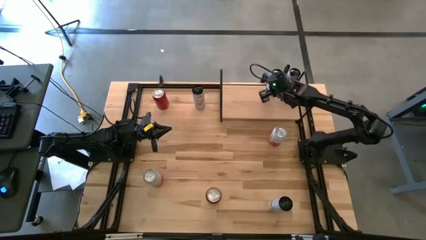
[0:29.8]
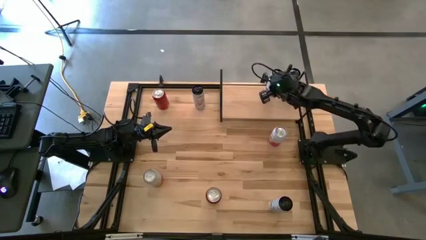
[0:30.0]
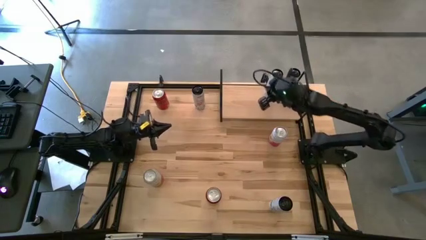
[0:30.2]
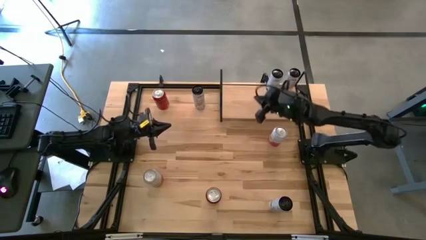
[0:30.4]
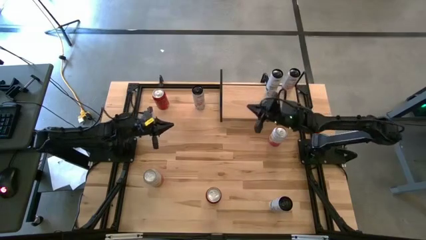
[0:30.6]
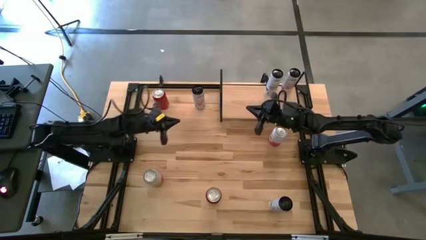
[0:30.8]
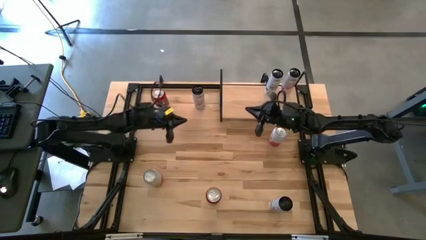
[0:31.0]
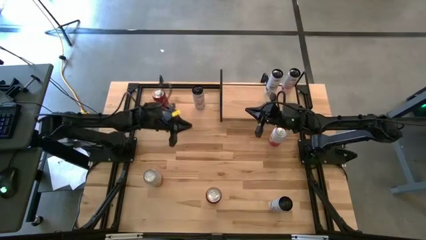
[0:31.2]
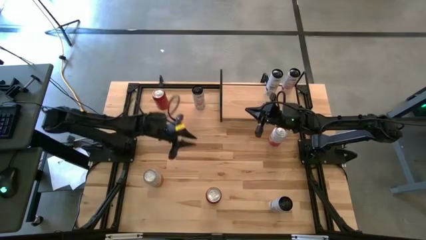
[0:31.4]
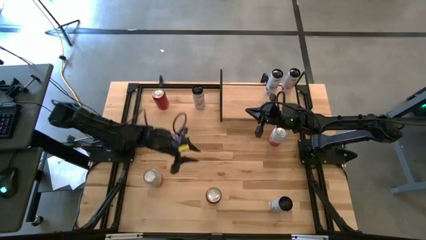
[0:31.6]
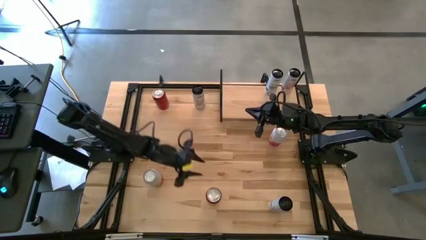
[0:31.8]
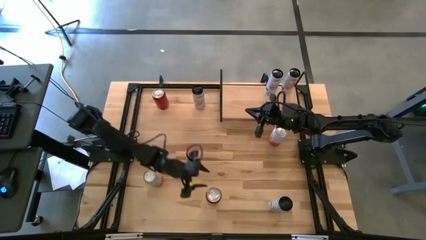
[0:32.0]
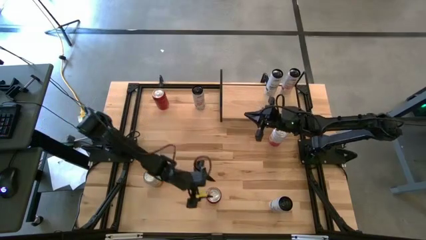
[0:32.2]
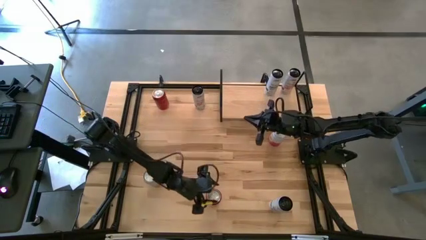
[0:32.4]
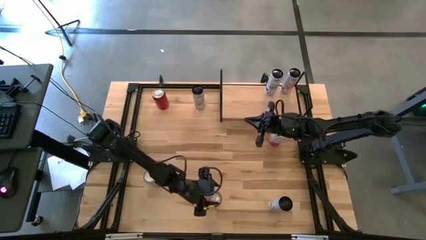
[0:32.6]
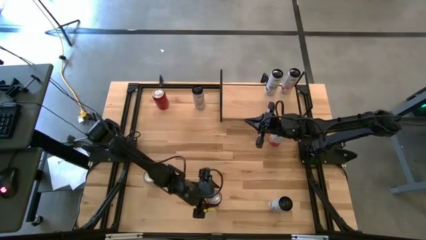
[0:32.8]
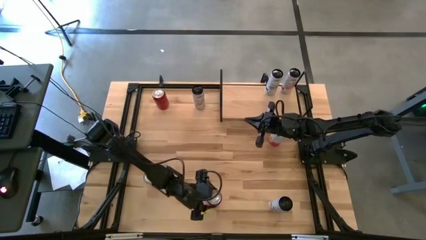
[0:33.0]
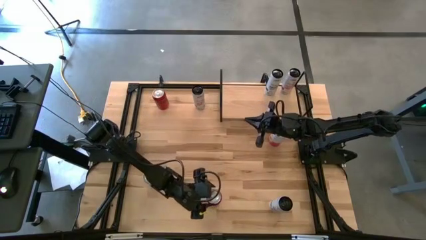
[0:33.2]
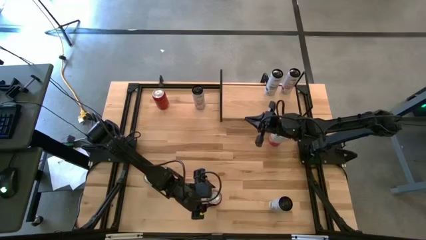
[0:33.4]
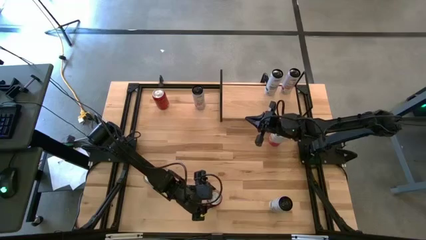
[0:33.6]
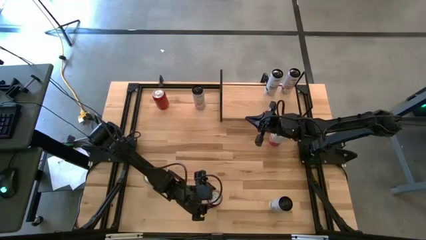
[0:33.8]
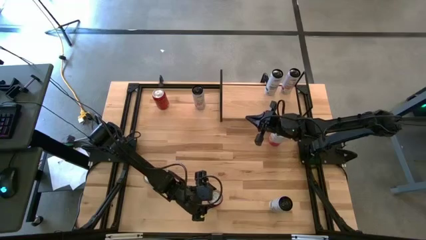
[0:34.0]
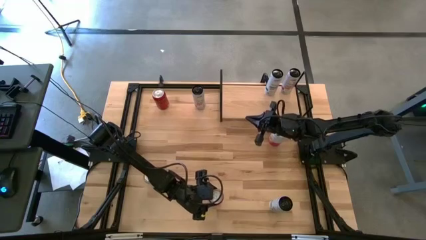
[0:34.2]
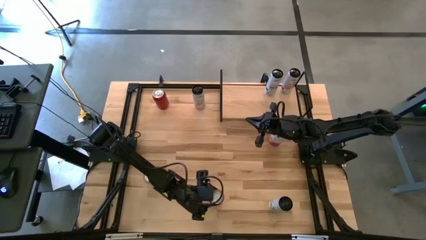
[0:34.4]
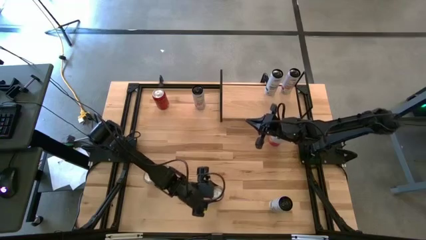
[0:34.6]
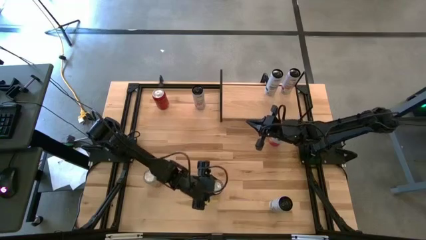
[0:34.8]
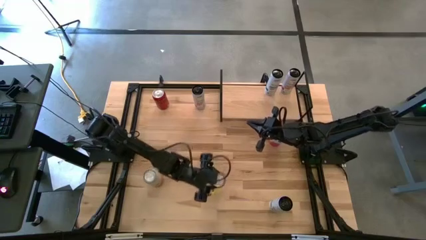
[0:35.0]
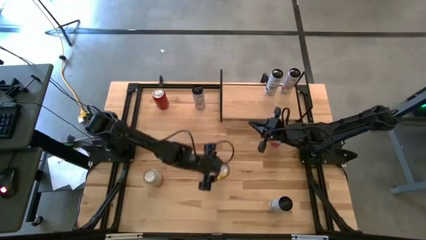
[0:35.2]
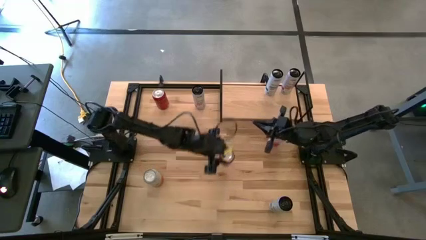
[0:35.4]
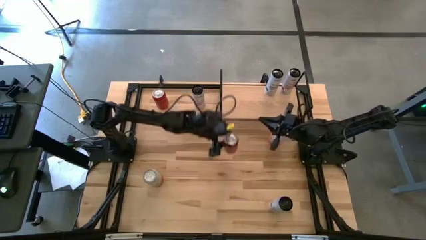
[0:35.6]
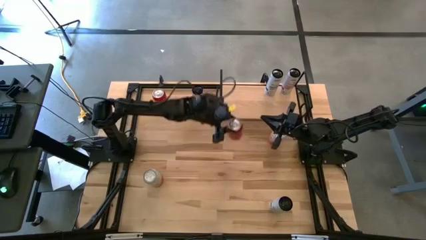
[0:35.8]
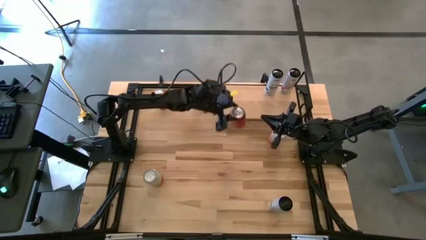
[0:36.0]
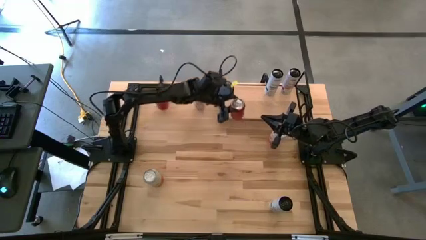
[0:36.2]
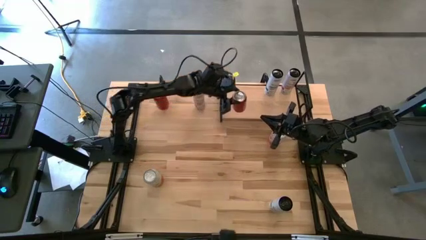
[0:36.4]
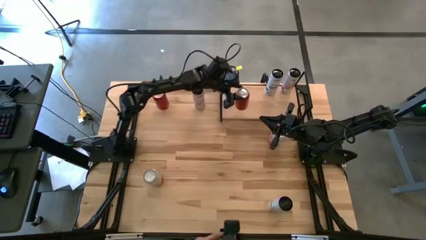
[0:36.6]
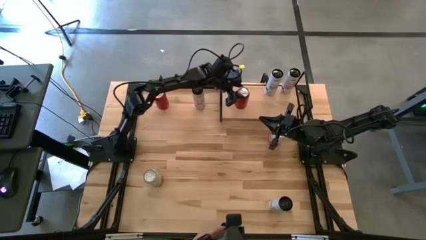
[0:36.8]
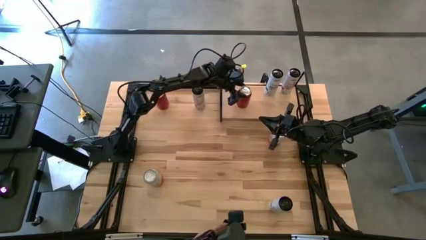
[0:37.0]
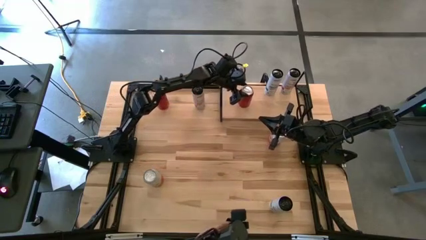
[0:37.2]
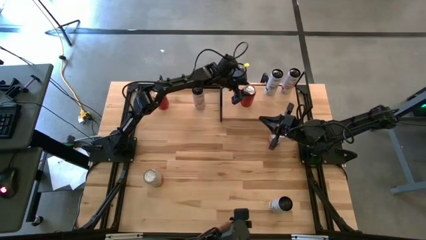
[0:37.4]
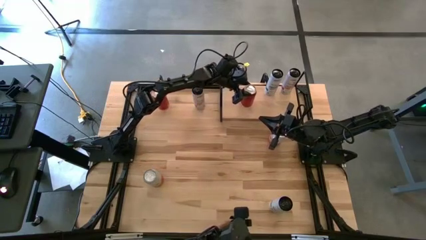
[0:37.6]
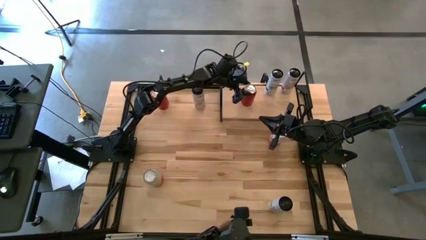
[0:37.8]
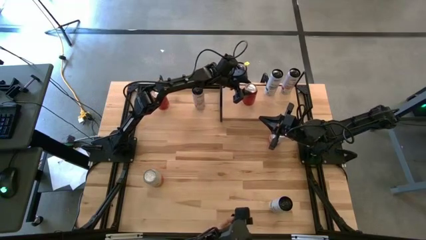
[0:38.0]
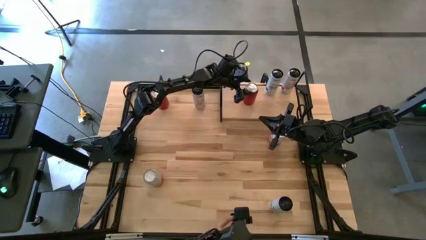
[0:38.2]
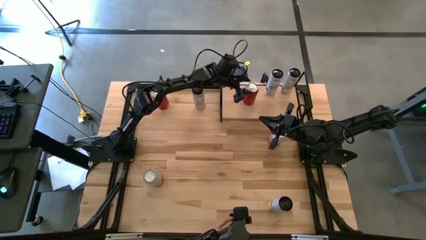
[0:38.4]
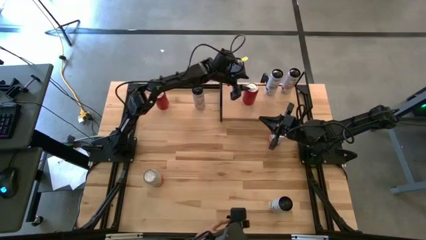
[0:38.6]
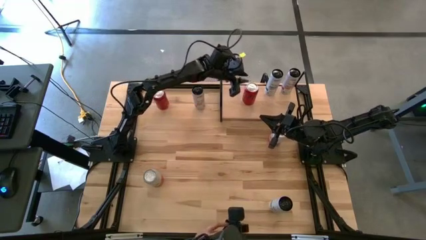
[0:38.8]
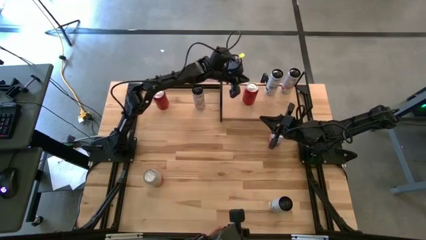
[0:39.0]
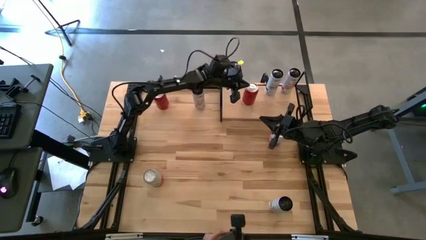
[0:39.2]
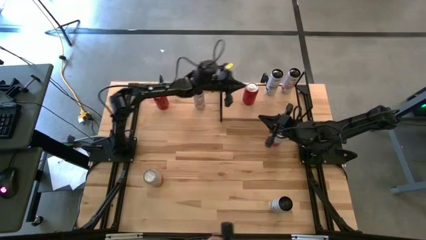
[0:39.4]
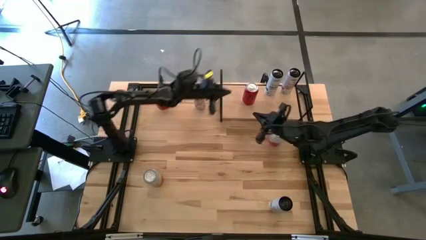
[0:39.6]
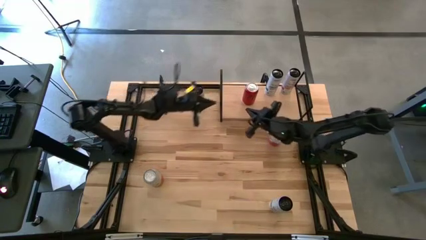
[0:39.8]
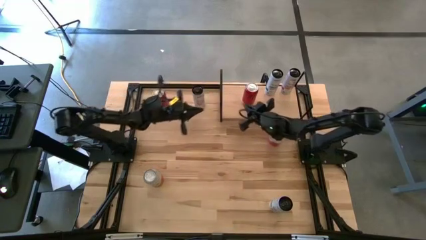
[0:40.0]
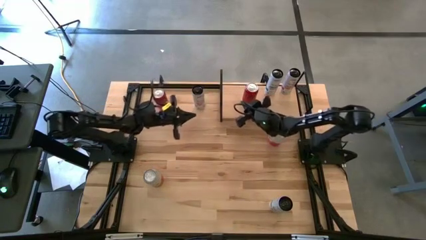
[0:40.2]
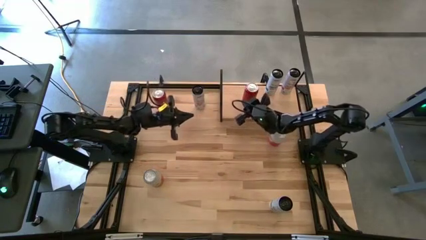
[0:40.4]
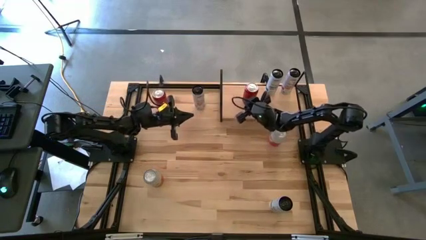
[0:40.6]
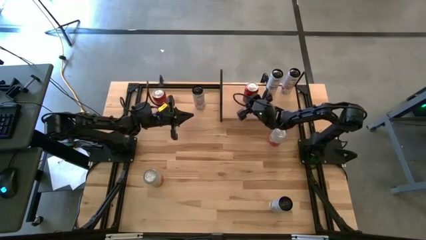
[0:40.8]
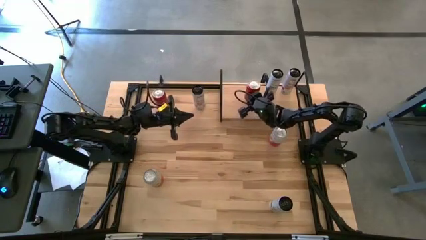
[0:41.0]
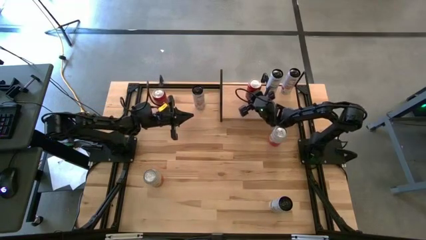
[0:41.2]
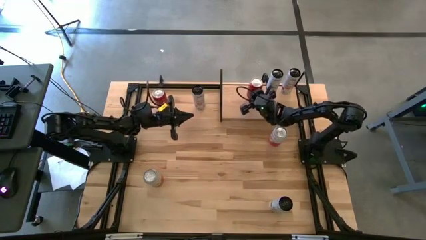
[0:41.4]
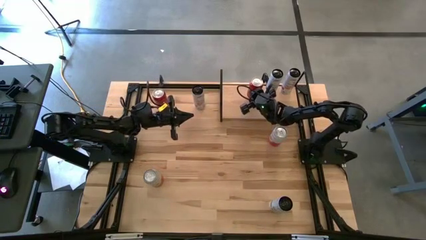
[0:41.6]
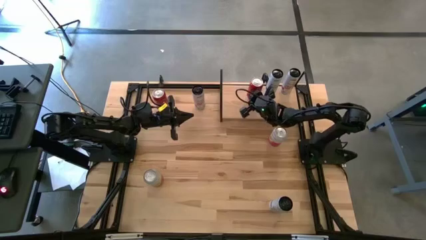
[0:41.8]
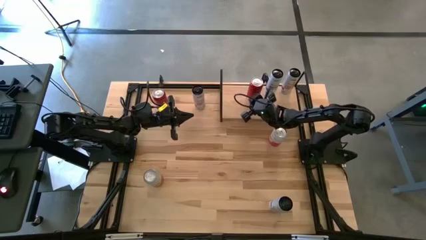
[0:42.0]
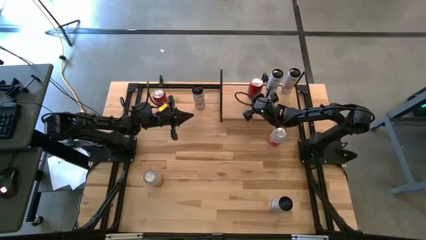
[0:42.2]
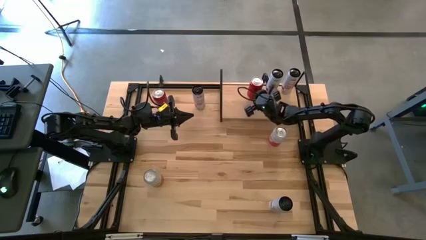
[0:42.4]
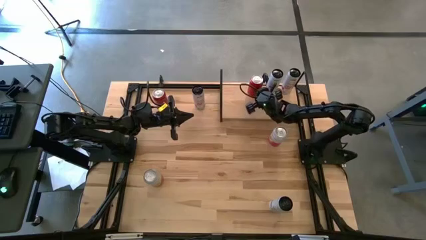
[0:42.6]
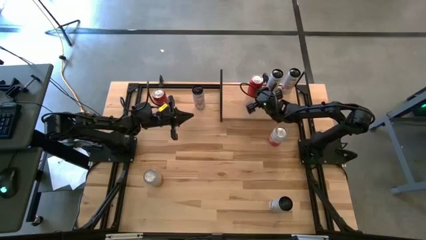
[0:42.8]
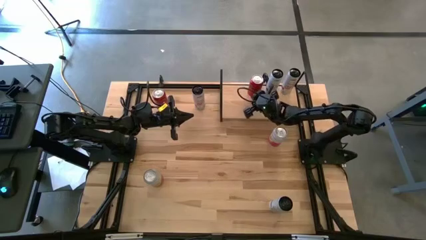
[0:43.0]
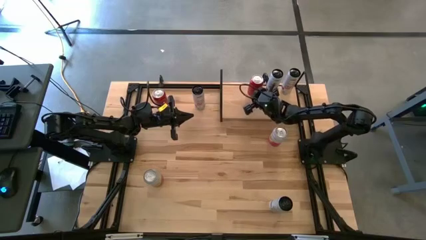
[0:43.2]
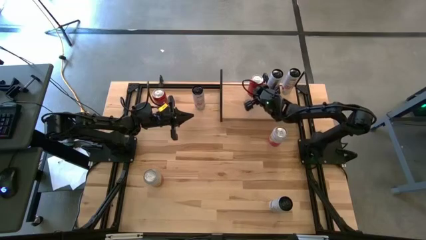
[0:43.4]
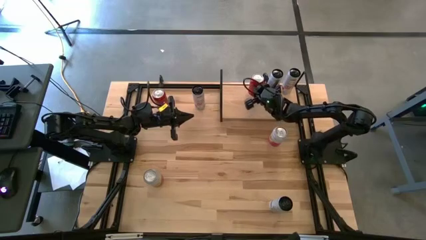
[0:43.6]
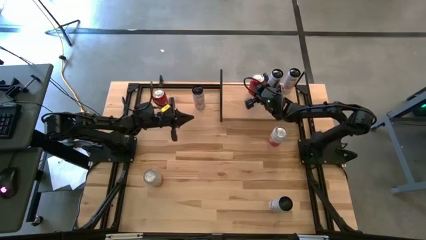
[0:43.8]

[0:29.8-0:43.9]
Task: Place canned beverage on shelf
Put the bottom red soda can on the shelf

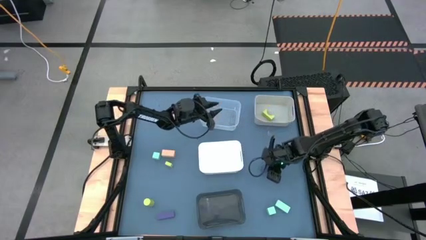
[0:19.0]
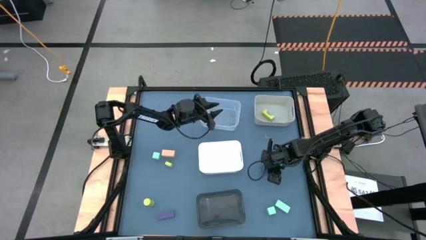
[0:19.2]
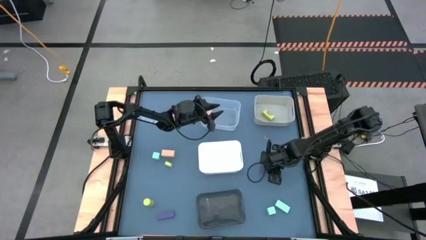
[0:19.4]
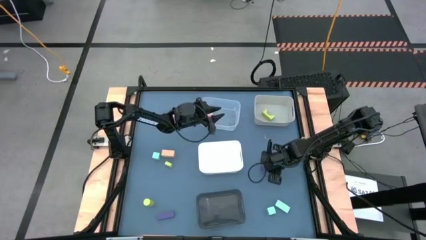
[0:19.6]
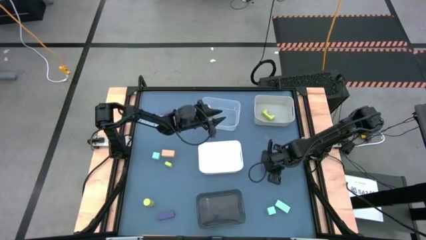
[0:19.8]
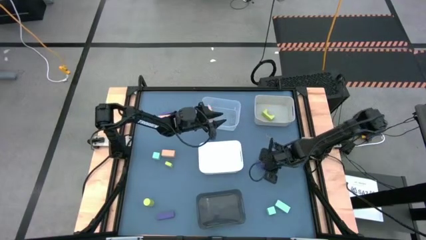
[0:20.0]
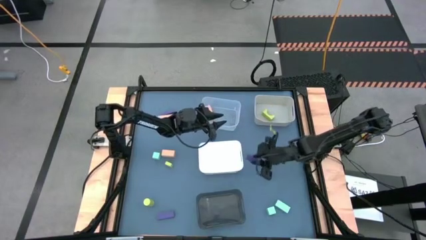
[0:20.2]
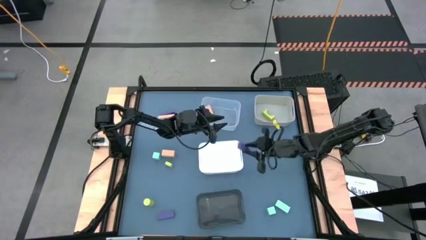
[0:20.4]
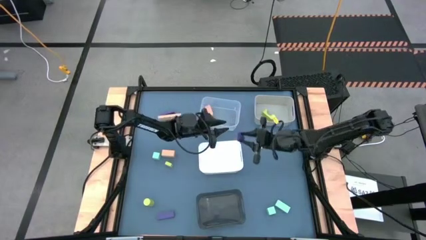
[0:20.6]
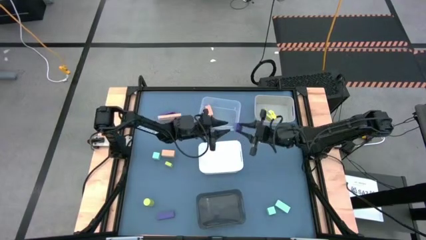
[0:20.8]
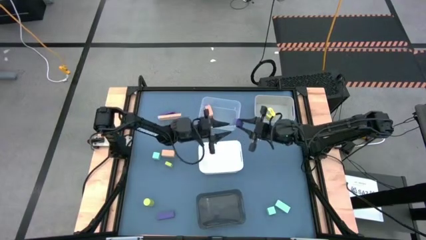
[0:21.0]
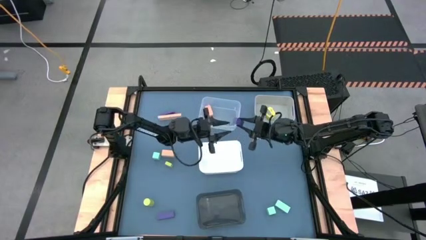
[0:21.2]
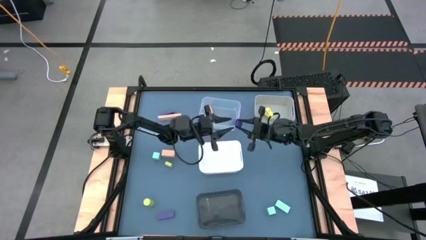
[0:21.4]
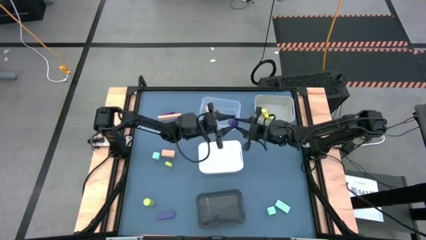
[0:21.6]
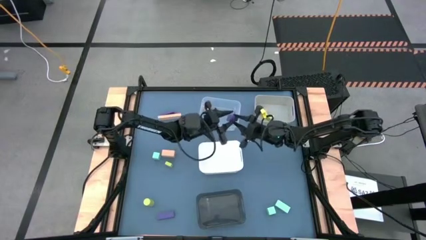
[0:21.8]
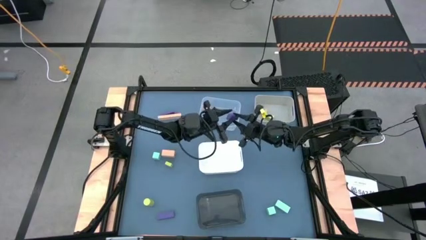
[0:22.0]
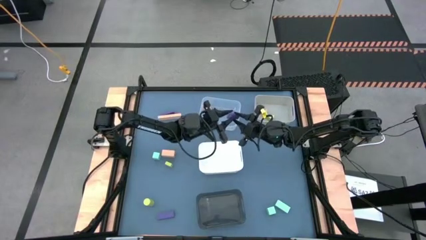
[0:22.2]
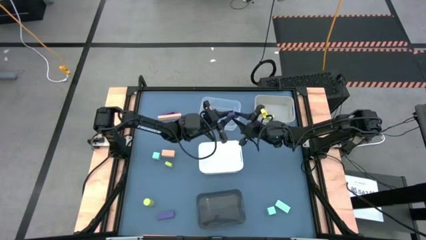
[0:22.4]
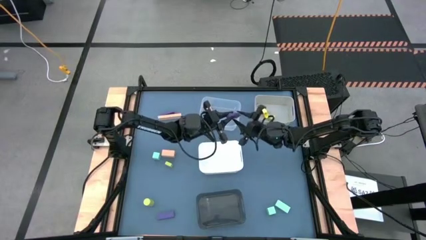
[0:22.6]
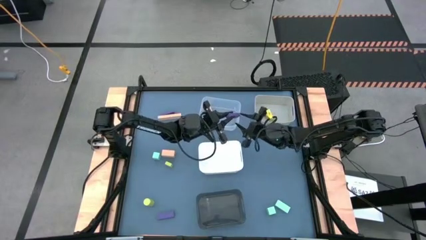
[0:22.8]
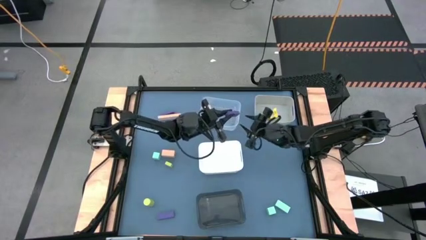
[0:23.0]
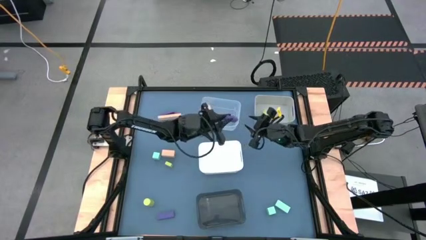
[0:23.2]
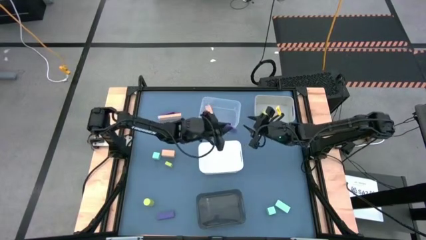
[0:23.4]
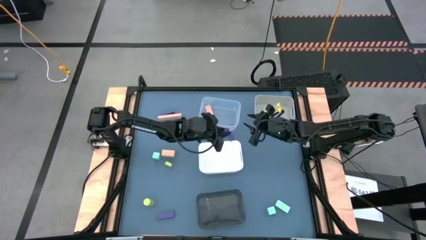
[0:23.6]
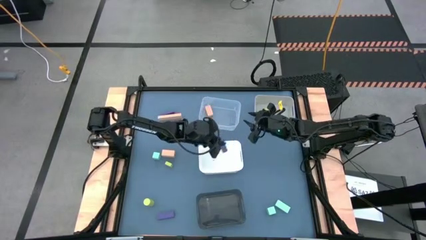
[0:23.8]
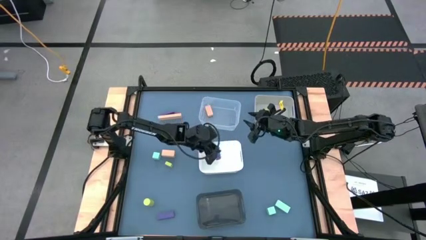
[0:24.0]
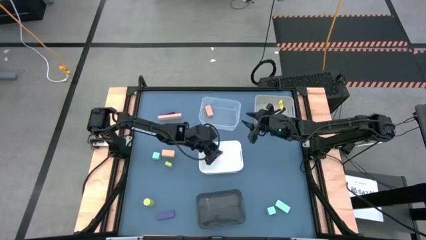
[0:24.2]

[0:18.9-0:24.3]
Task: Sort & place blocks by color
Put the middle purple rectangle block into the white bin
